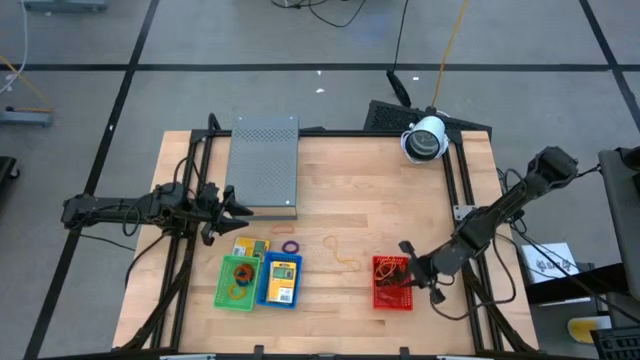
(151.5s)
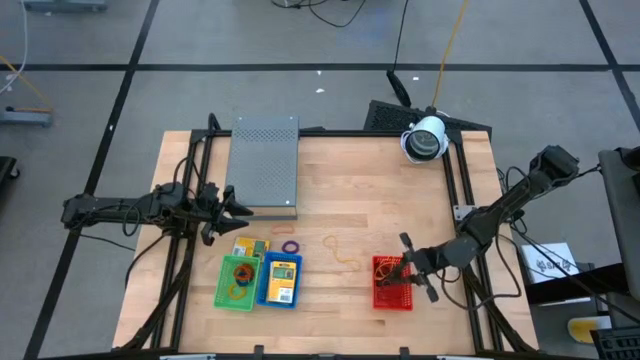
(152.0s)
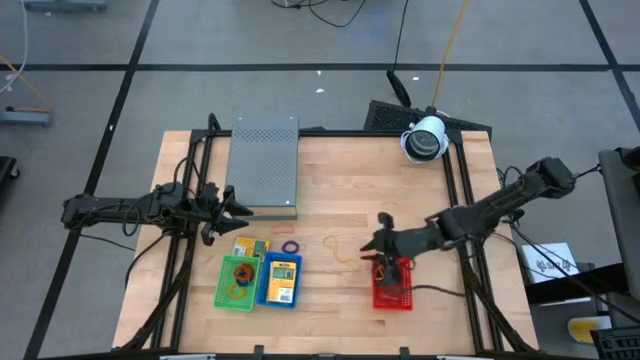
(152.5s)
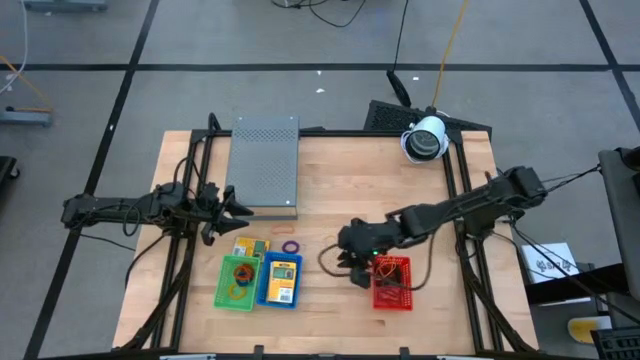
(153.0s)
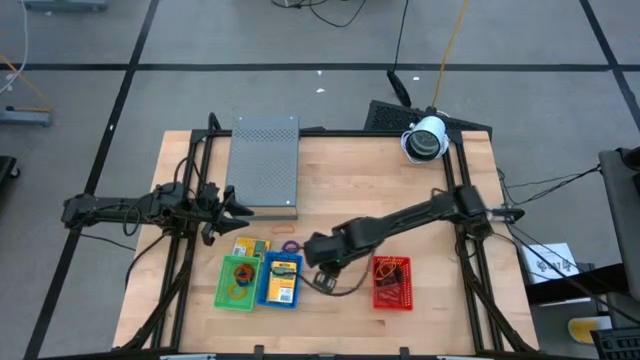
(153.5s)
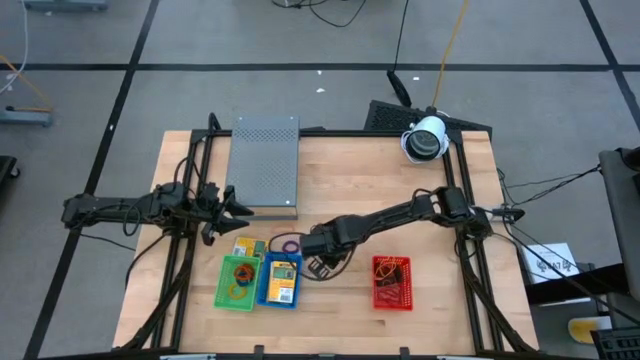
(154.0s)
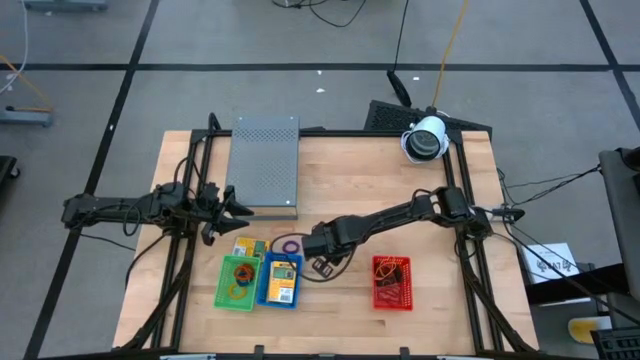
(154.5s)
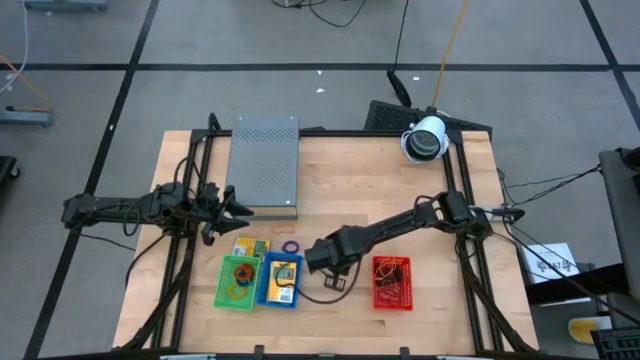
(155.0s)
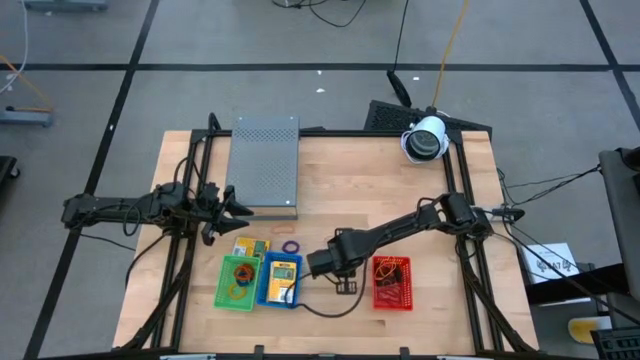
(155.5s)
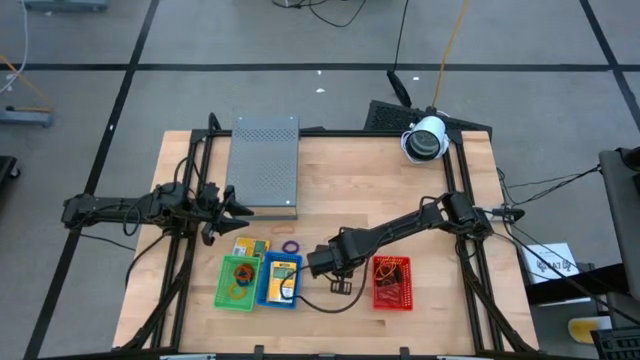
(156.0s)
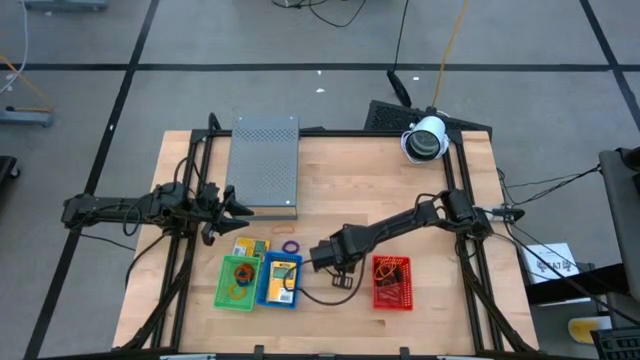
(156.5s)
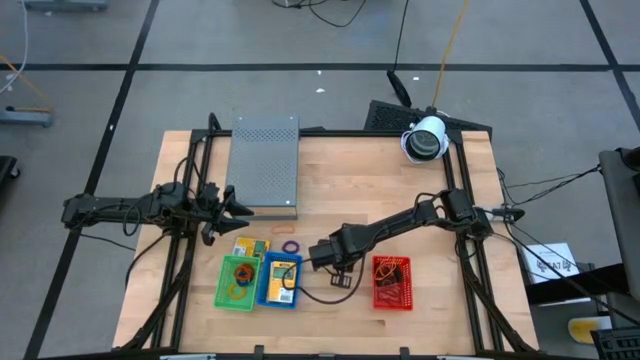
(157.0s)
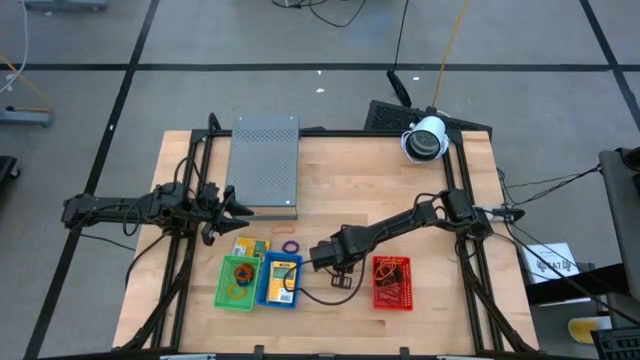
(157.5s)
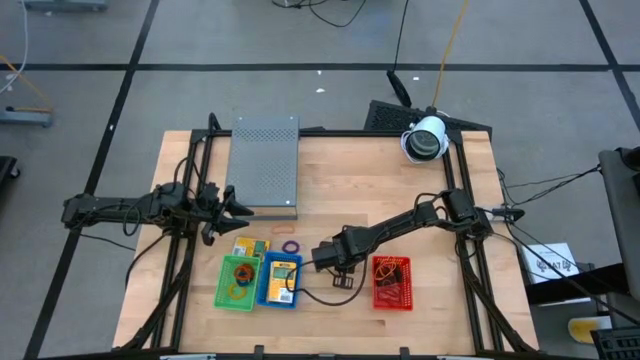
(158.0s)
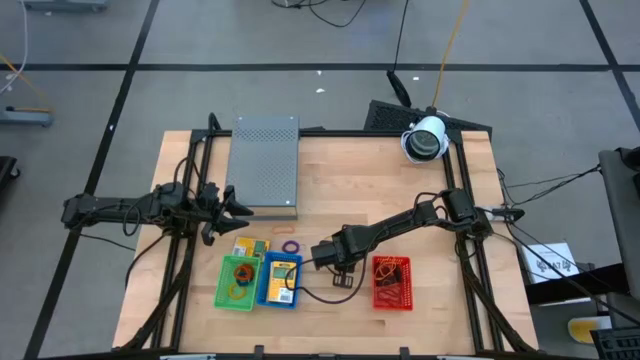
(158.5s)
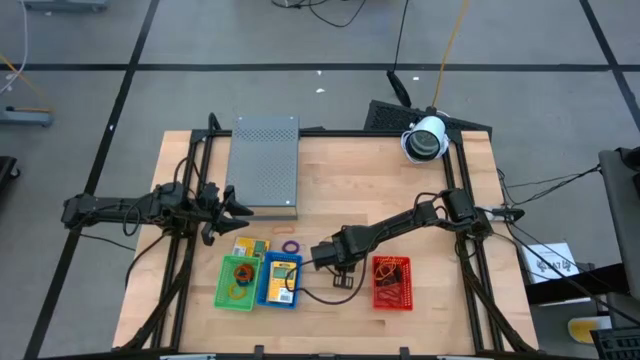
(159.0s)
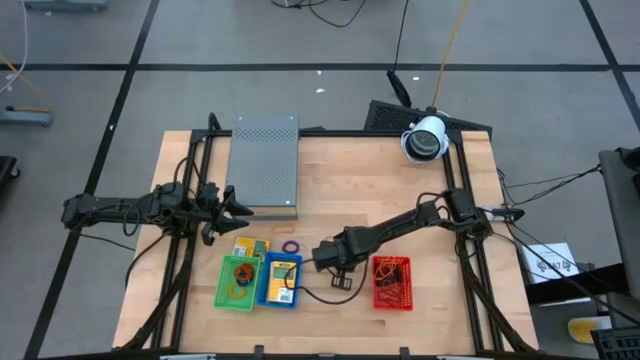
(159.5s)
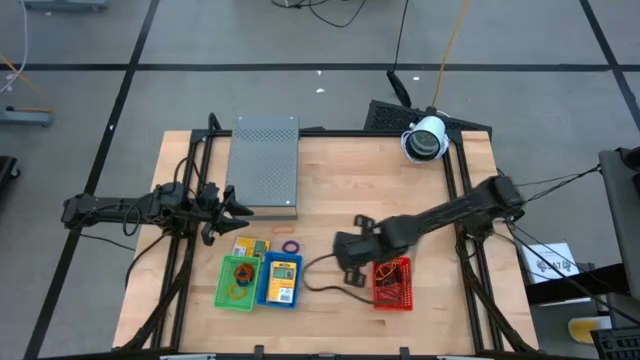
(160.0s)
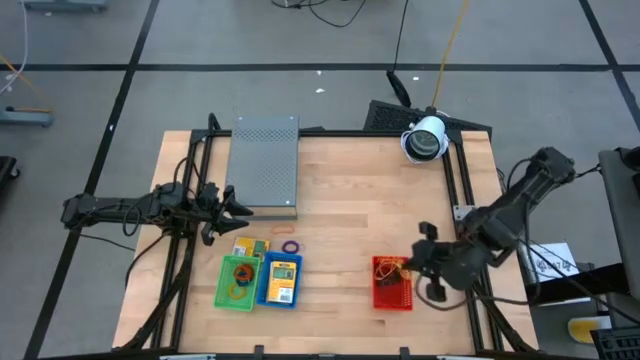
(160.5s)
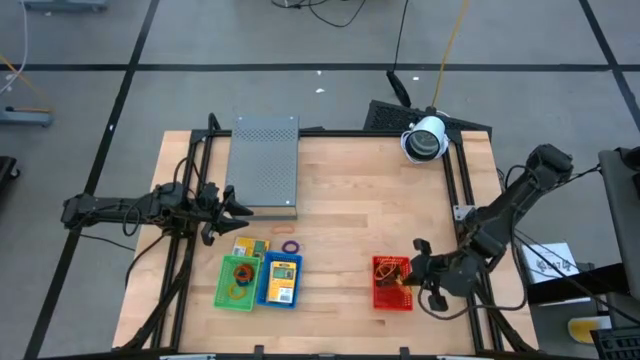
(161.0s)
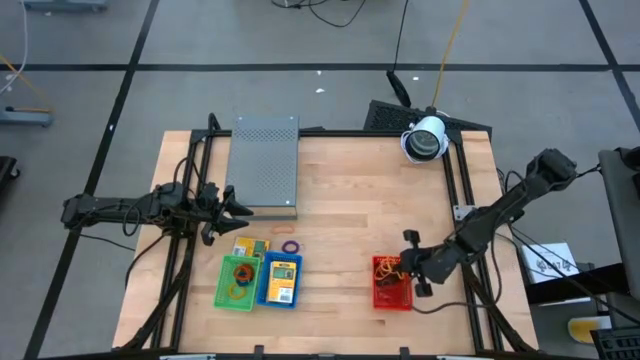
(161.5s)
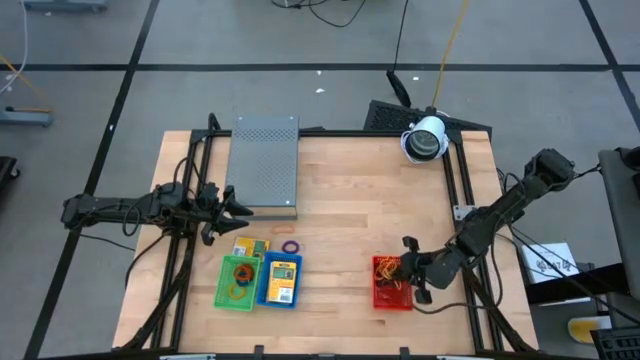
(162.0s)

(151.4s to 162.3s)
Task: Pick & Place Office Desk Supplies
Put the yellow rubber band into the red bin

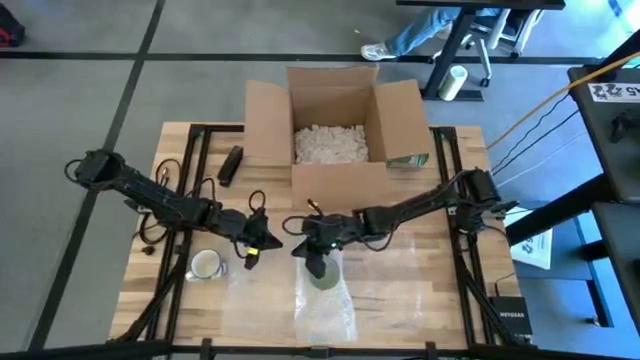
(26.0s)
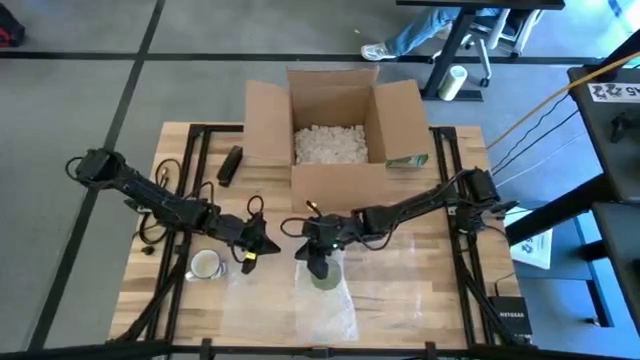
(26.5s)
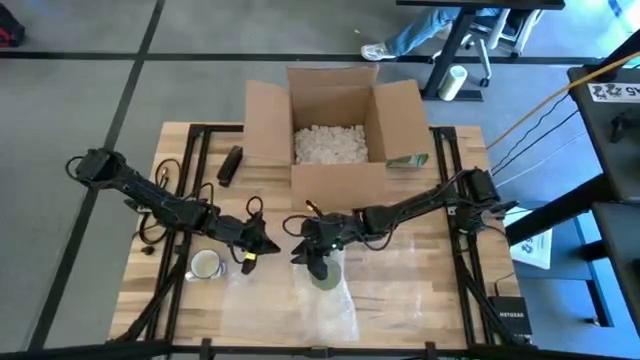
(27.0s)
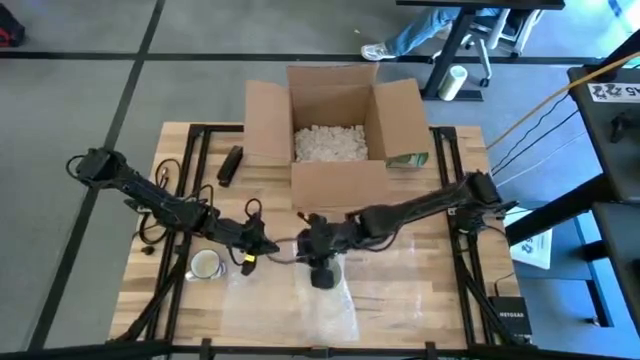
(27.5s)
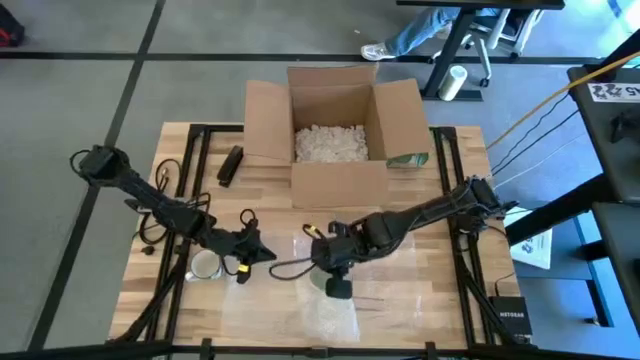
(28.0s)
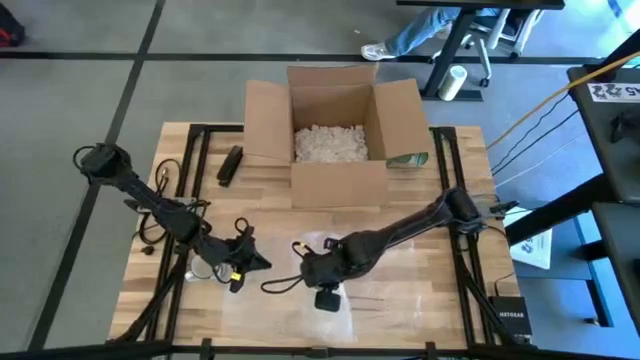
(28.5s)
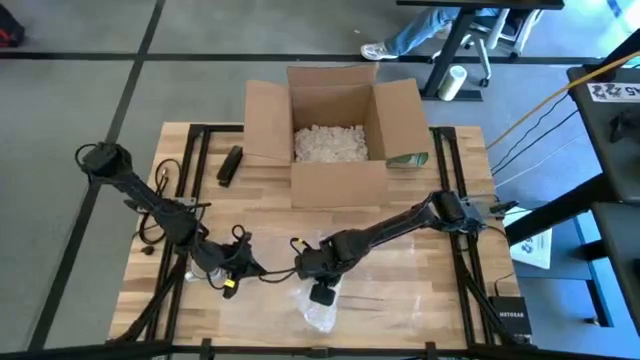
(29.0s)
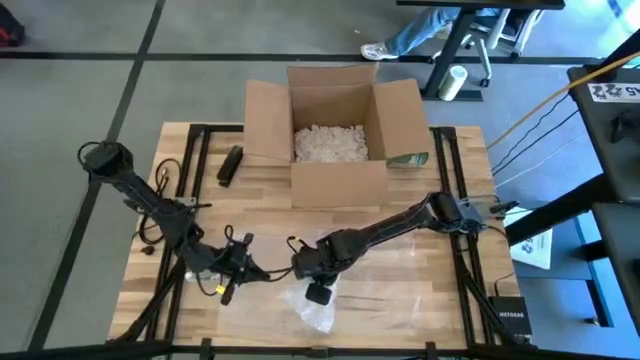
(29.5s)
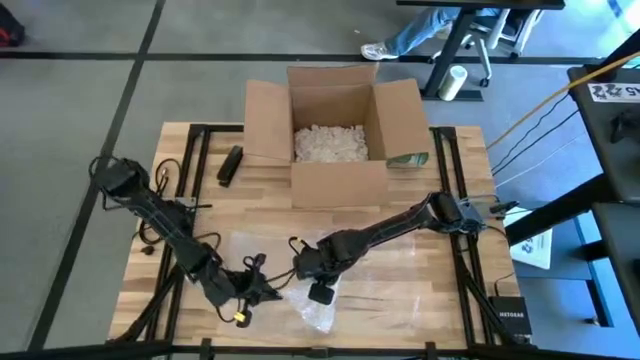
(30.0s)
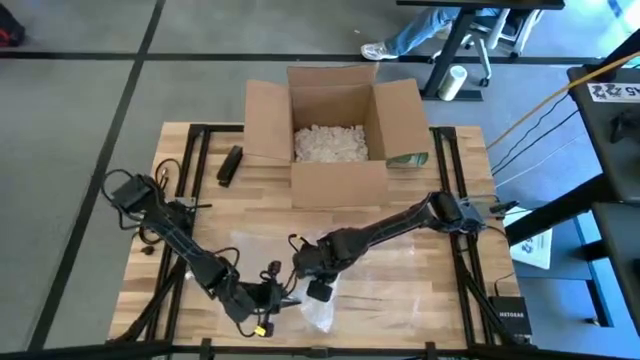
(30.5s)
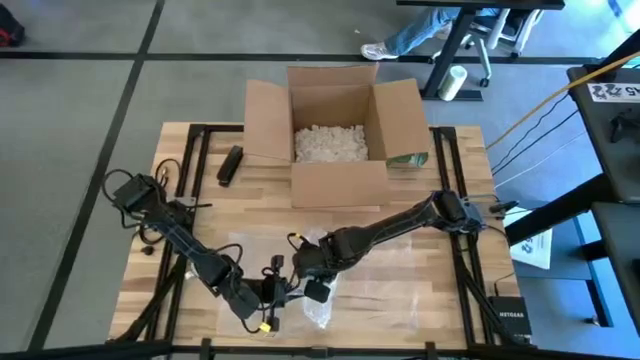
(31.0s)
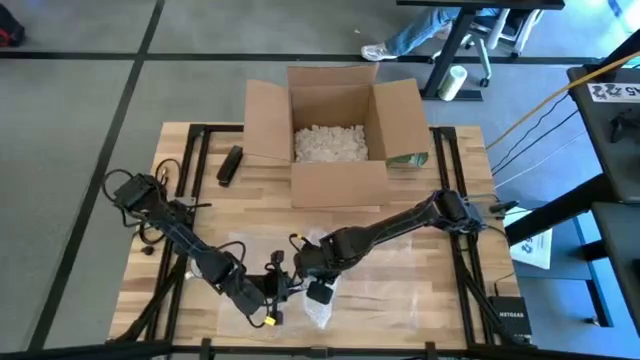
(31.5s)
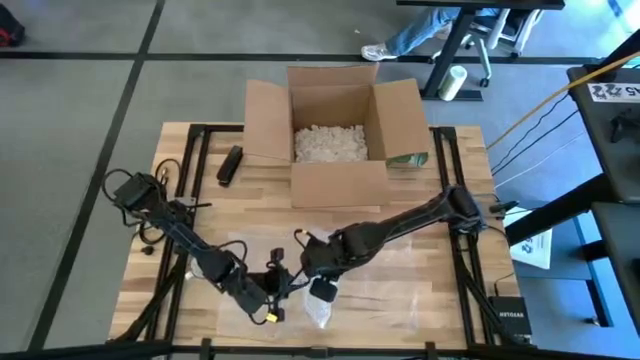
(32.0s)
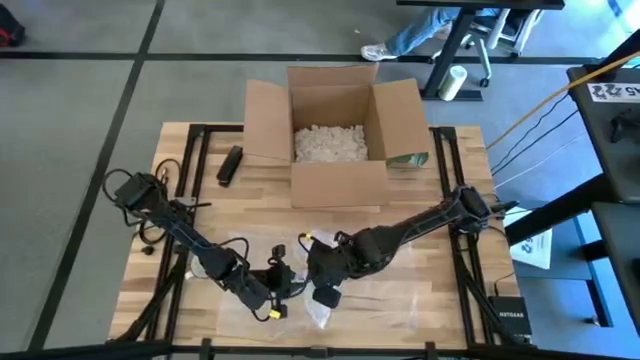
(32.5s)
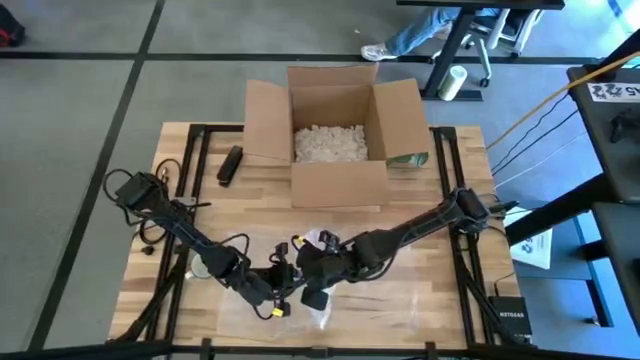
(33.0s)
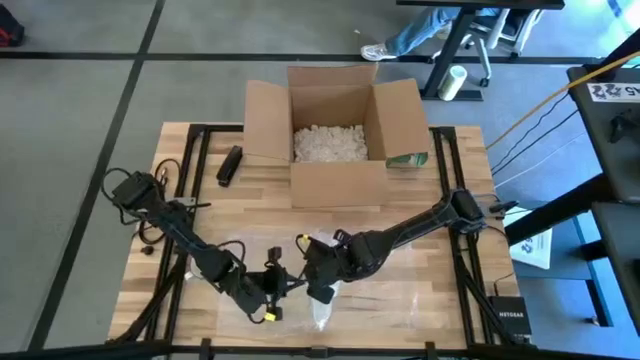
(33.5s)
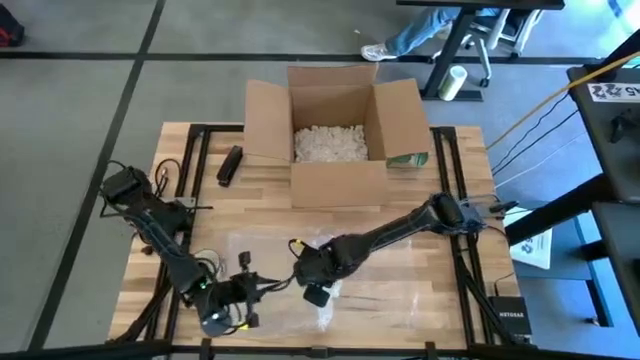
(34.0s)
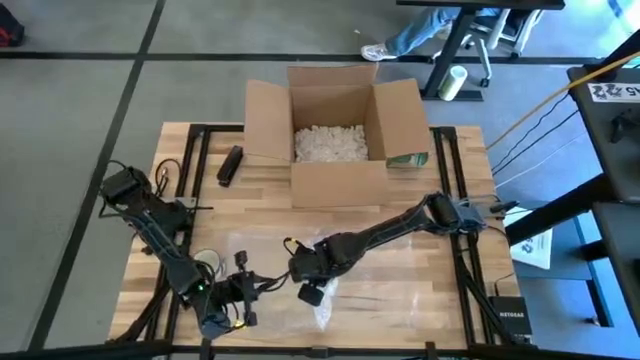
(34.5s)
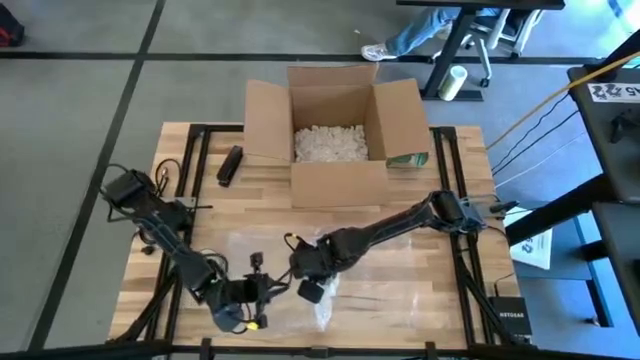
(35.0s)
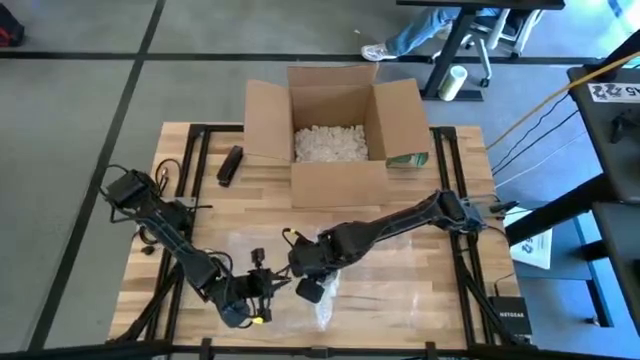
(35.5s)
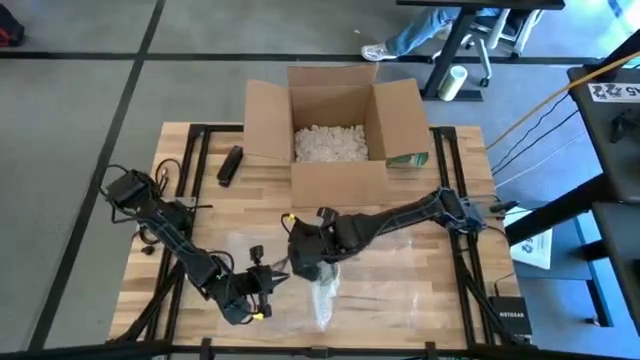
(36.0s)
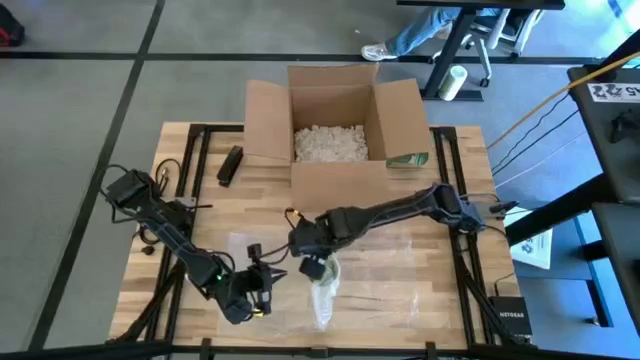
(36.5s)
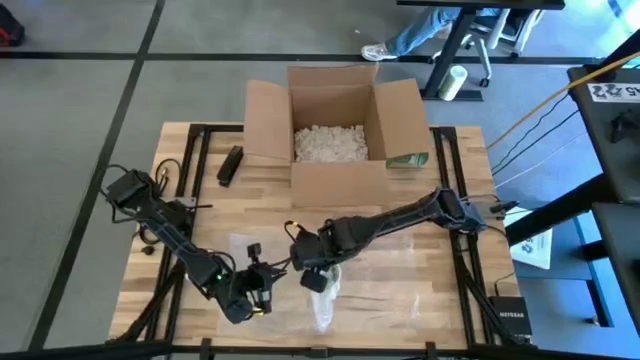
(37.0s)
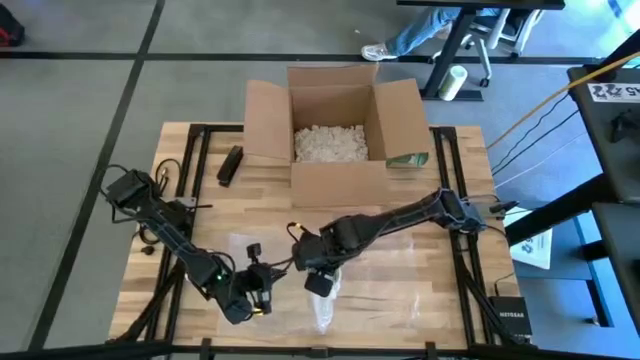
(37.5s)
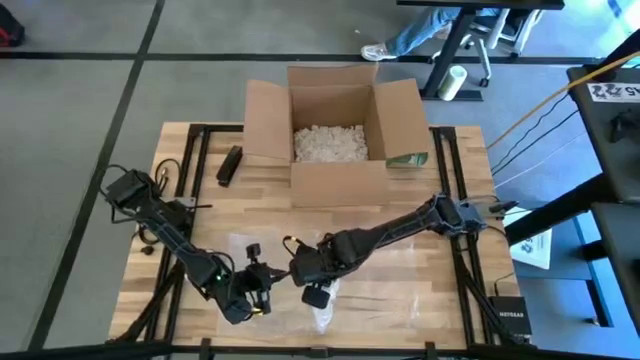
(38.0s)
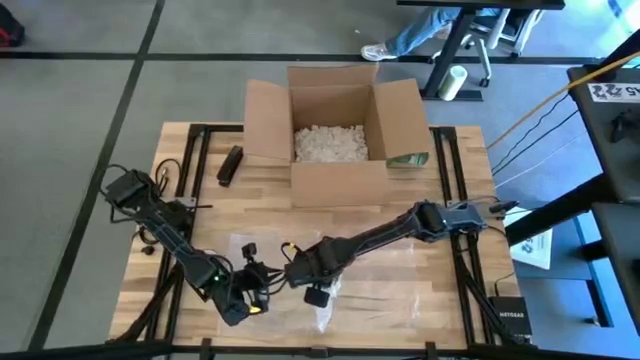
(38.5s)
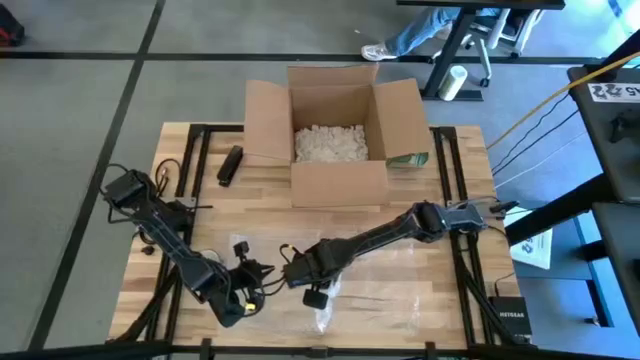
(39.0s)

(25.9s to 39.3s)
Task: wrap mug
Wrap the green mug with bubble wrap
